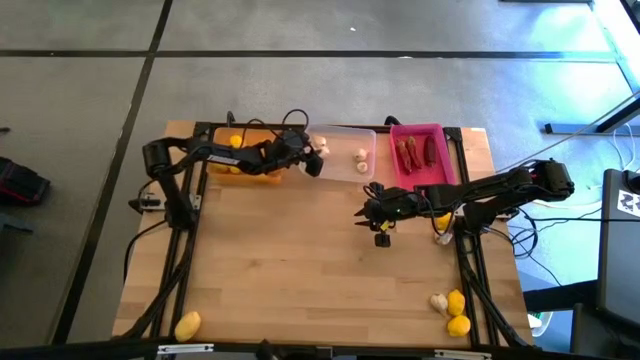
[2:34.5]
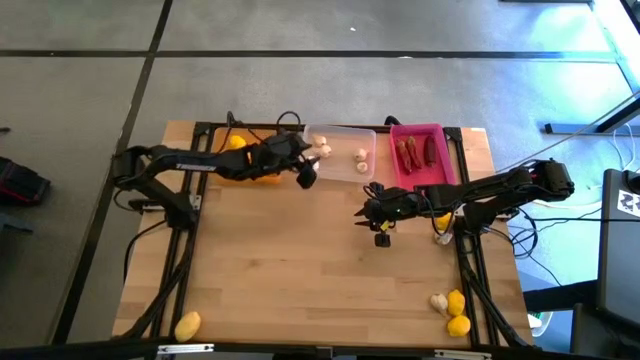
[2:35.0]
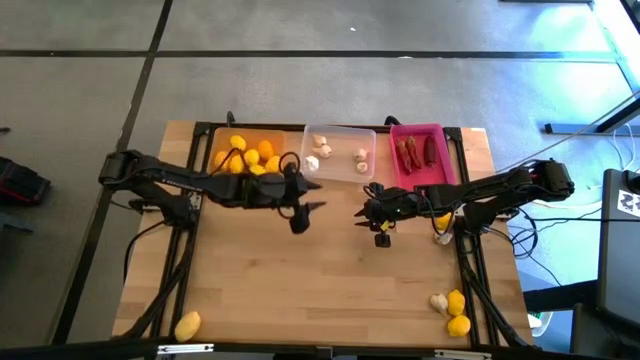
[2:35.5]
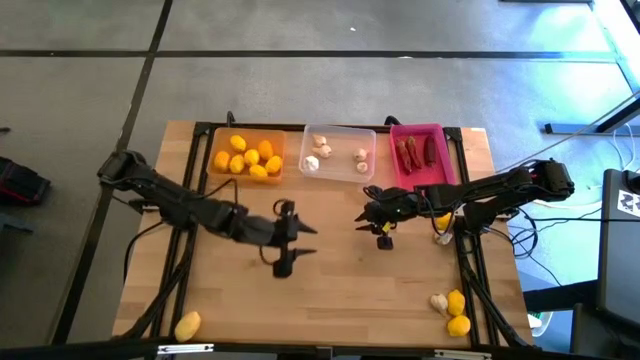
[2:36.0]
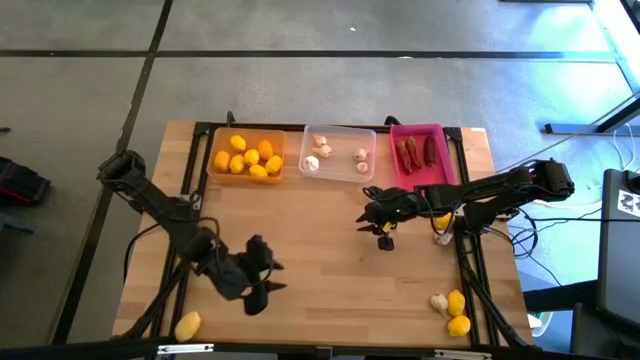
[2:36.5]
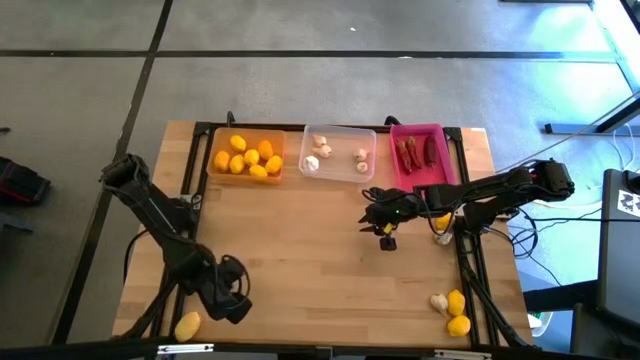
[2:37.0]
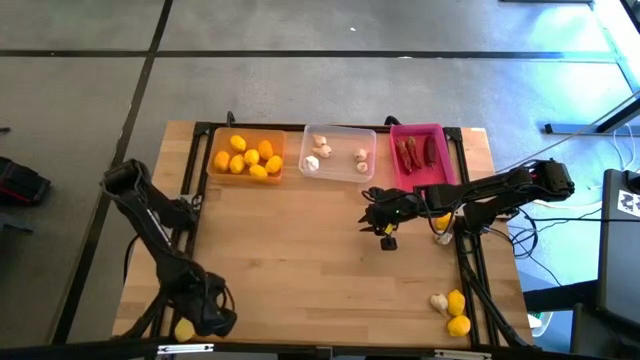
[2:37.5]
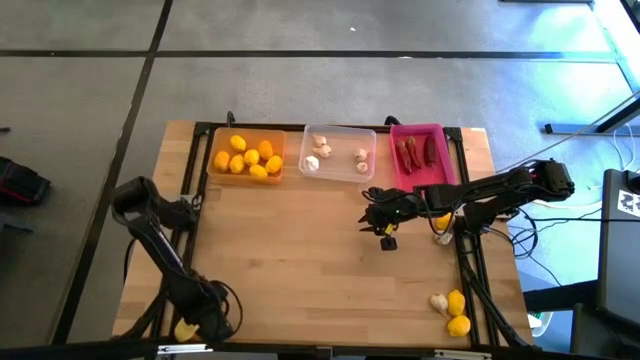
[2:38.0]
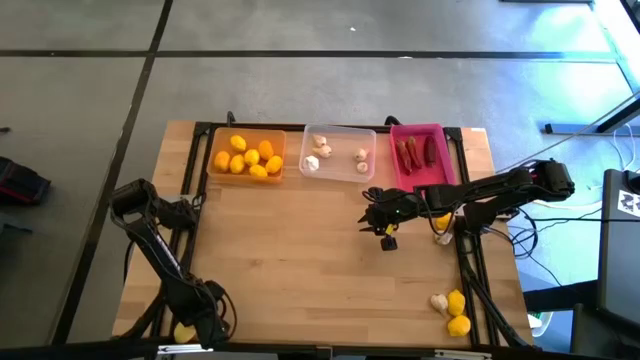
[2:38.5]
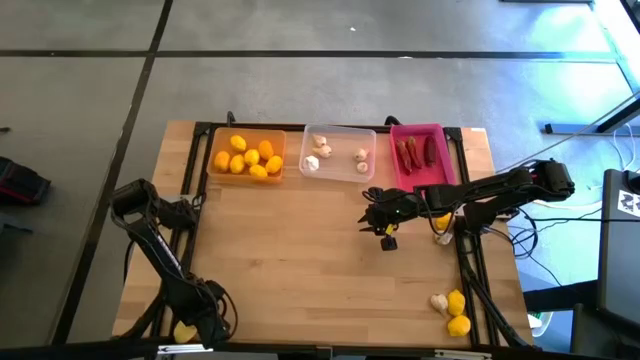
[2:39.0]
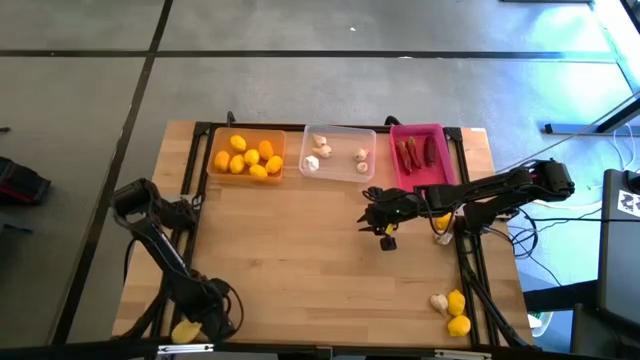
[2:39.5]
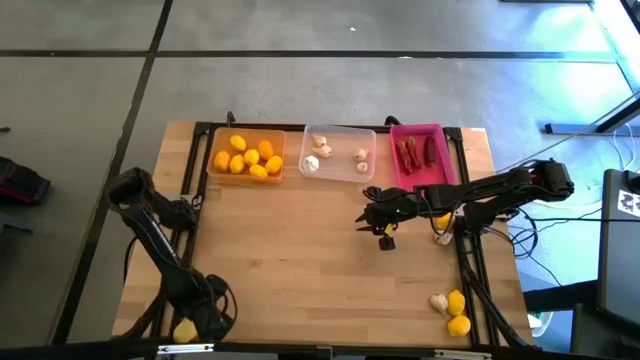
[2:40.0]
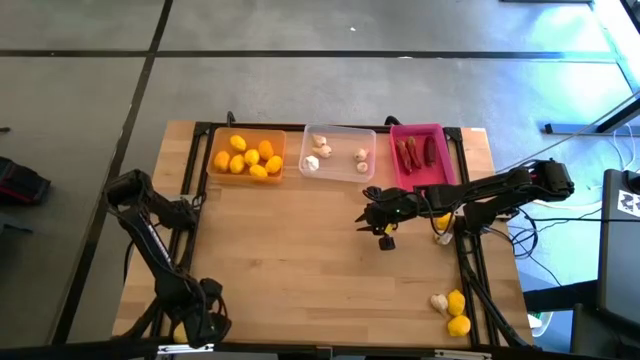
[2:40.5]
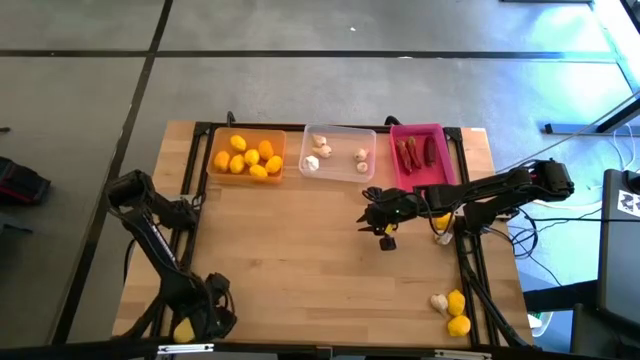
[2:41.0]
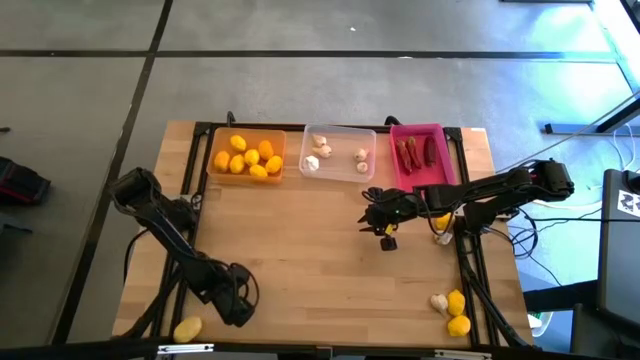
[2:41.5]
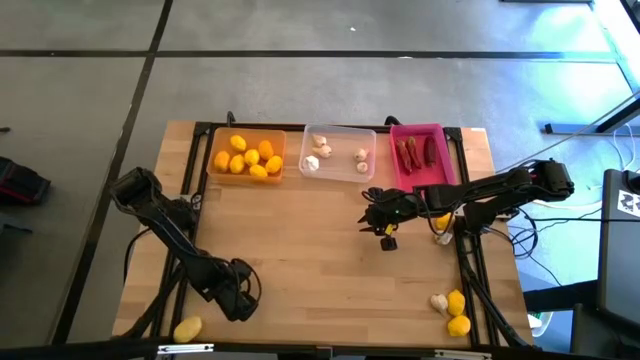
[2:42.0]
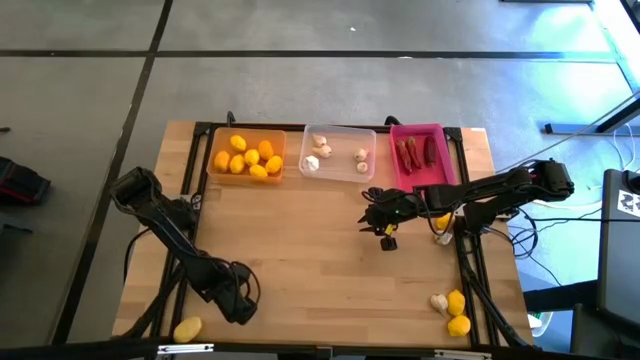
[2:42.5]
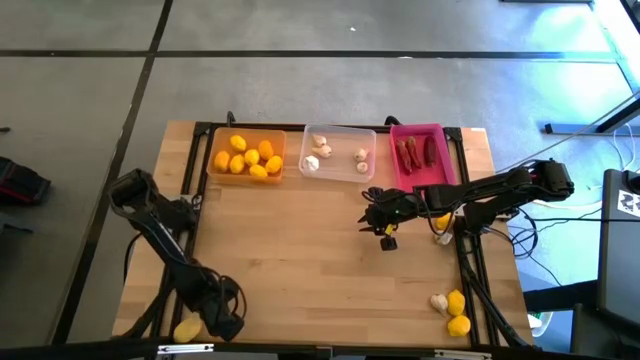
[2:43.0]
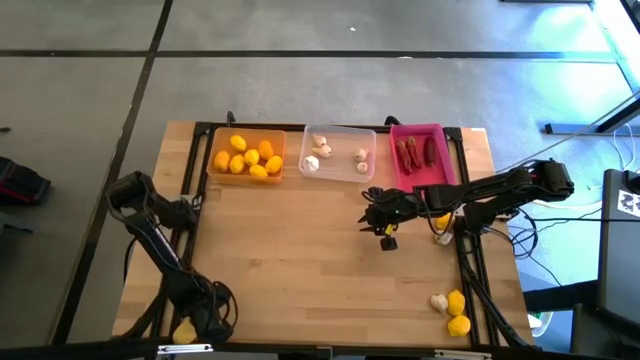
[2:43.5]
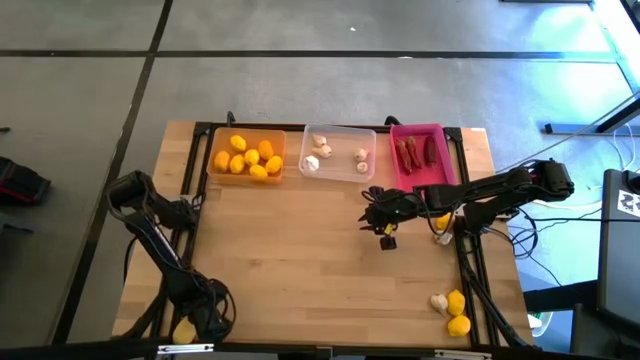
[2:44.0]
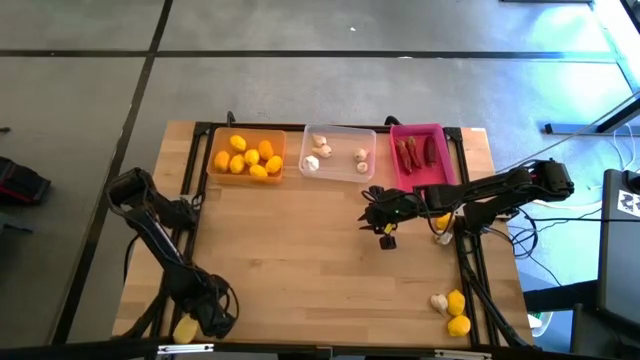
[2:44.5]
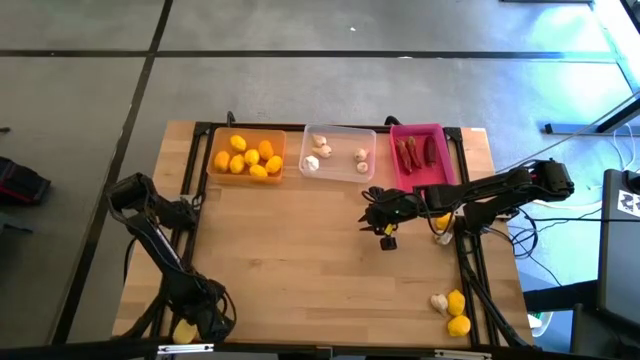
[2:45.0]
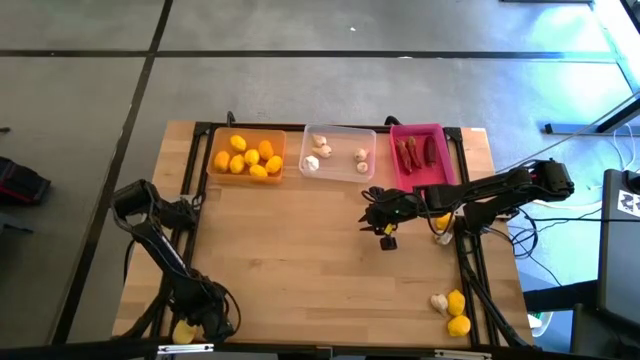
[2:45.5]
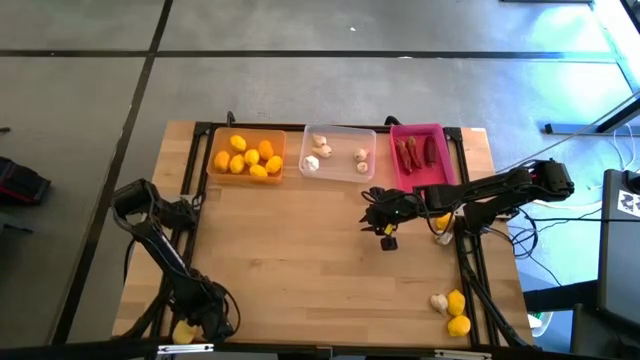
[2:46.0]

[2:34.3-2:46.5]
Task: Sort produce into baskets
Put the yellow lemon into the orange bin

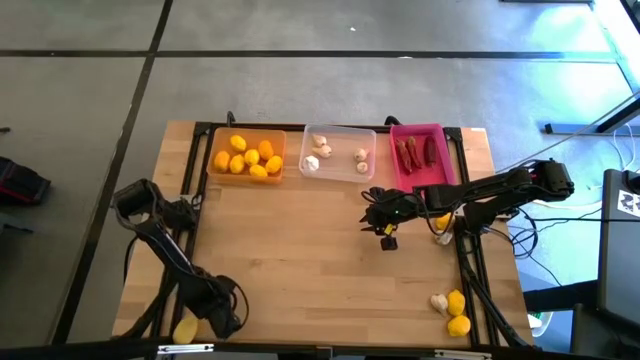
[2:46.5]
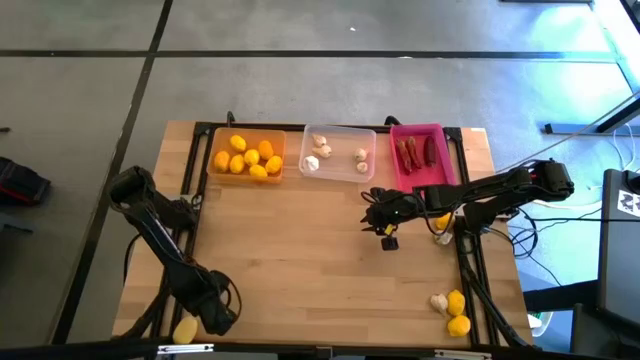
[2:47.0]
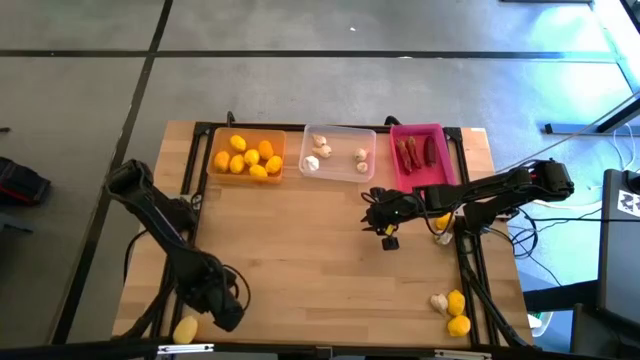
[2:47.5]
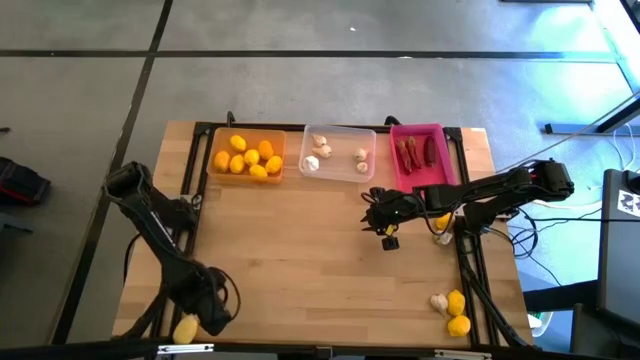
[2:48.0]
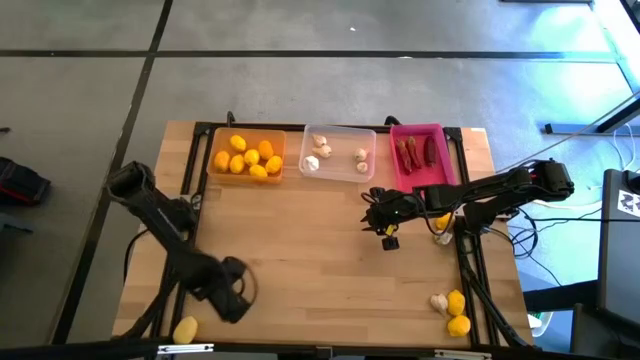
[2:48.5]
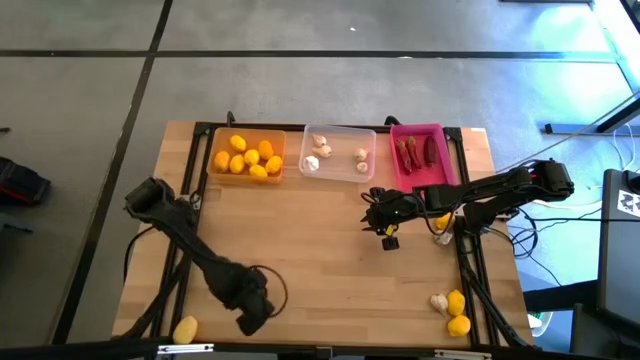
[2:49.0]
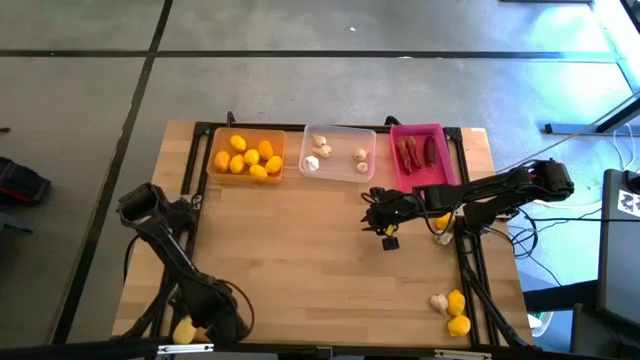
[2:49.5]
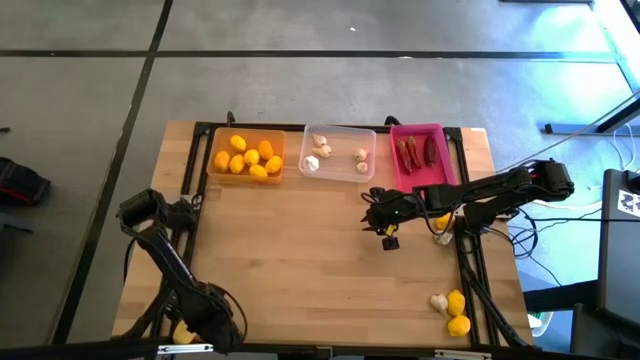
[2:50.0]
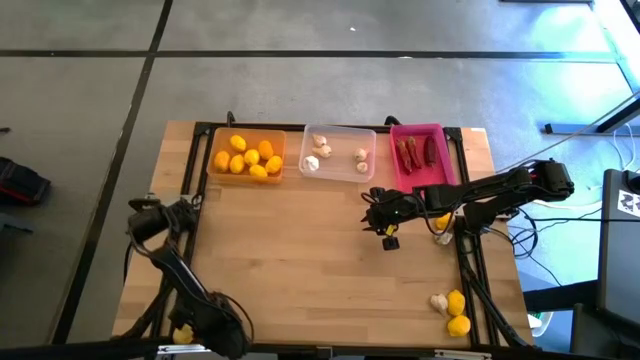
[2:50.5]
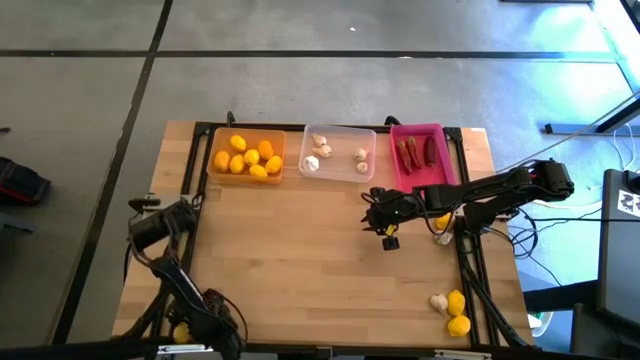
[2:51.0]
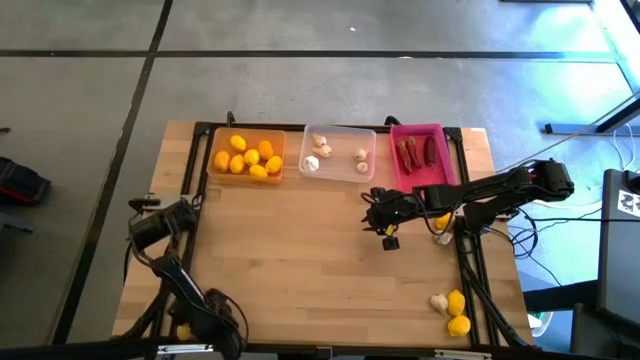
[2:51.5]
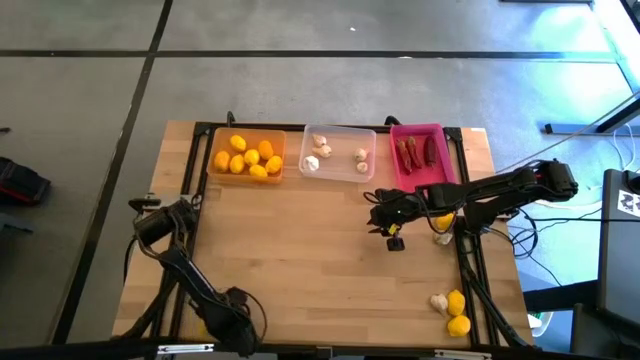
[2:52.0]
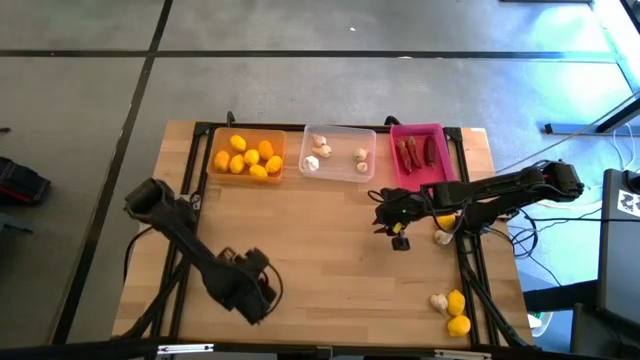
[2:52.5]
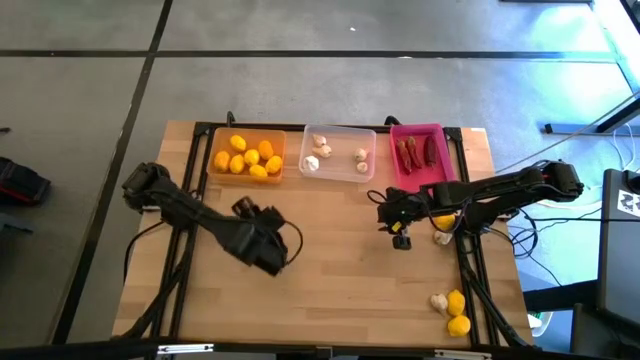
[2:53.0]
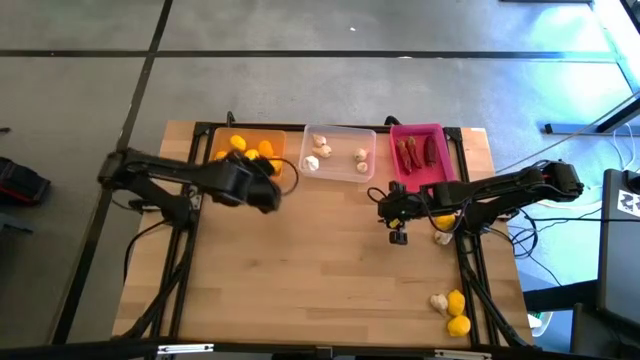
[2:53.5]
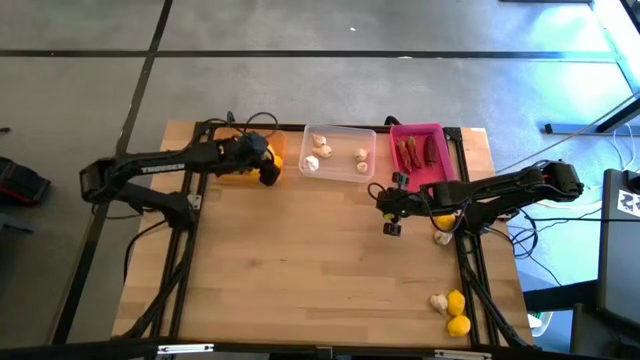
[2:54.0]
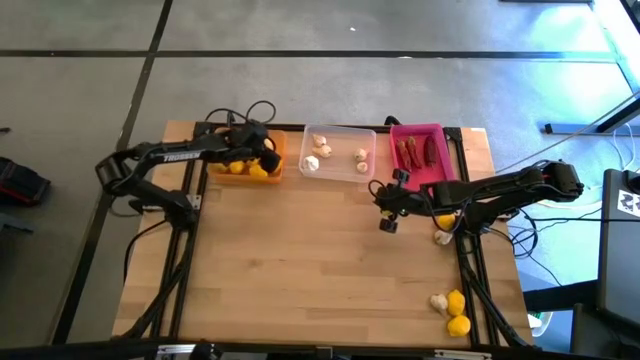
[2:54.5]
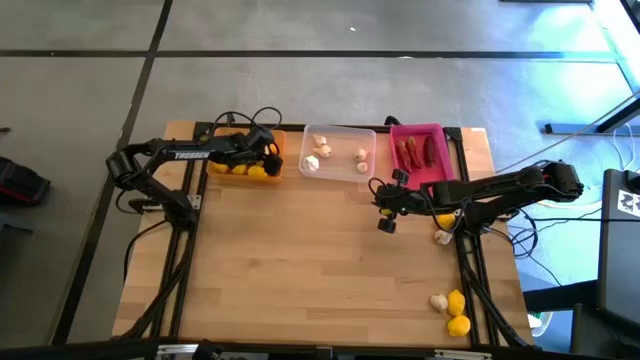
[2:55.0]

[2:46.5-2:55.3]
Put the yellow lemon into the orange bin
